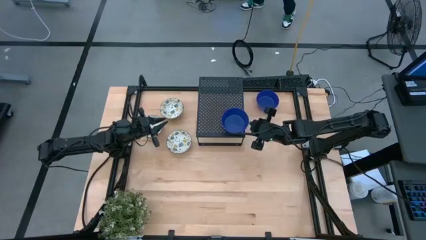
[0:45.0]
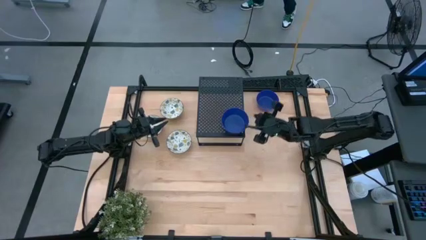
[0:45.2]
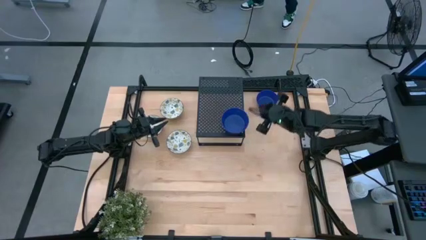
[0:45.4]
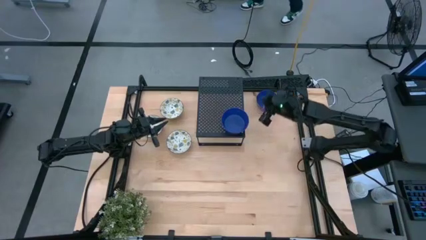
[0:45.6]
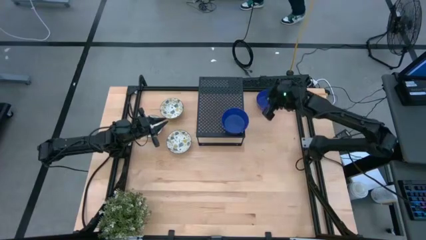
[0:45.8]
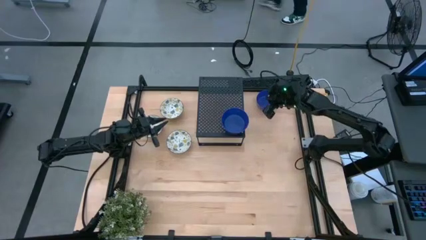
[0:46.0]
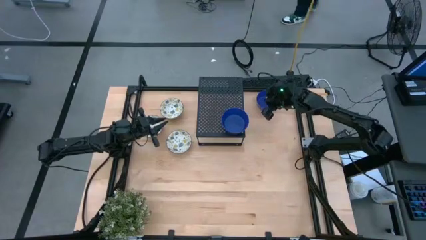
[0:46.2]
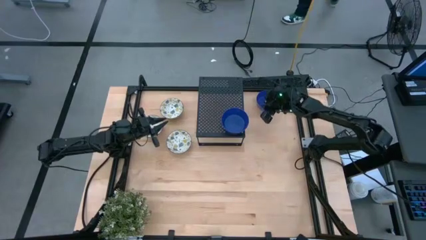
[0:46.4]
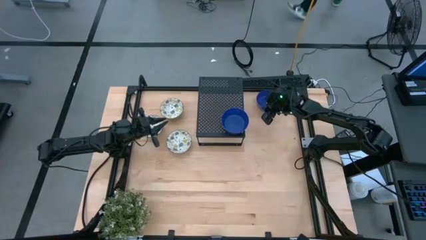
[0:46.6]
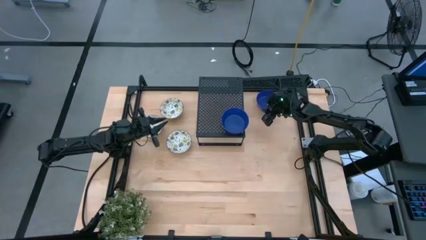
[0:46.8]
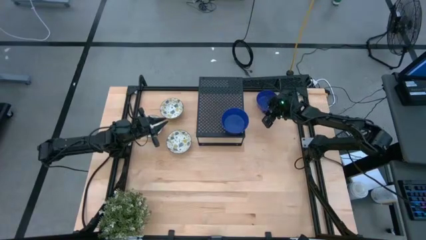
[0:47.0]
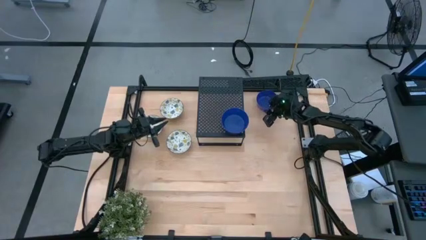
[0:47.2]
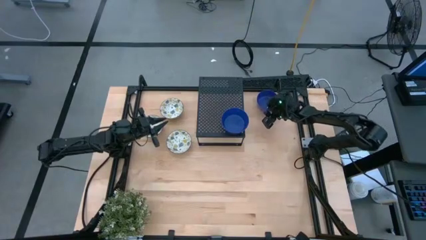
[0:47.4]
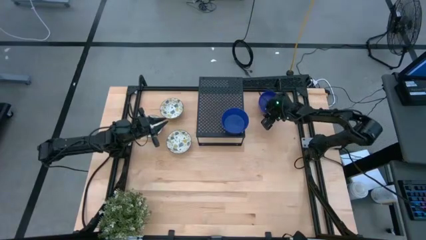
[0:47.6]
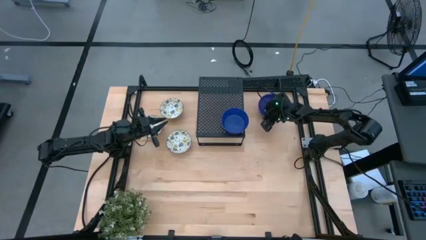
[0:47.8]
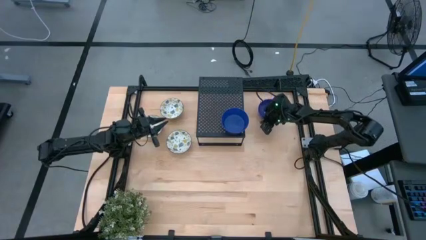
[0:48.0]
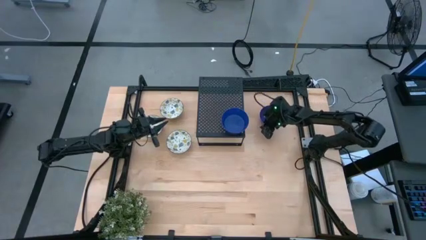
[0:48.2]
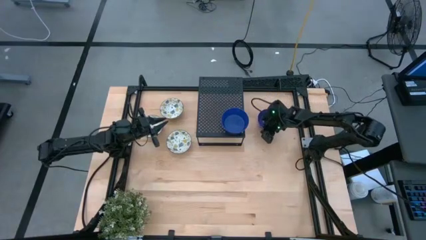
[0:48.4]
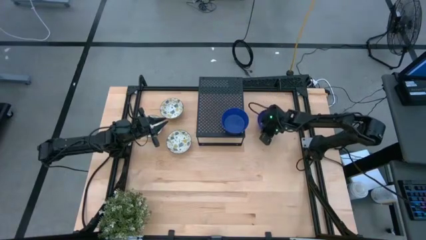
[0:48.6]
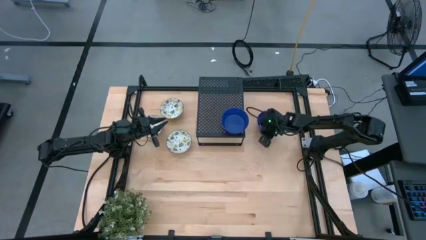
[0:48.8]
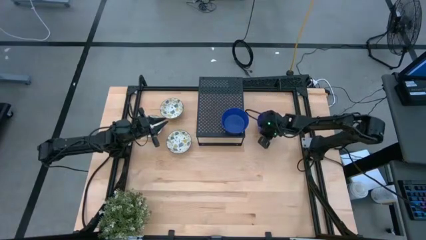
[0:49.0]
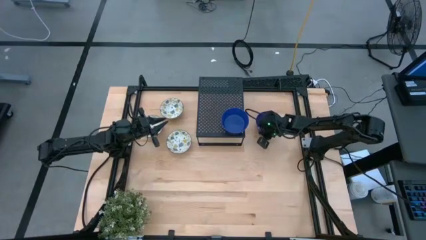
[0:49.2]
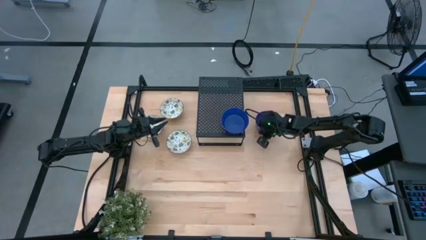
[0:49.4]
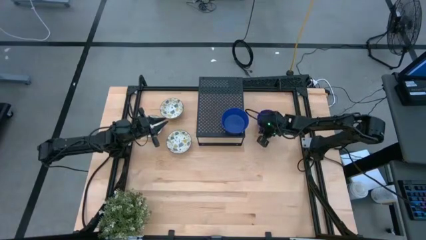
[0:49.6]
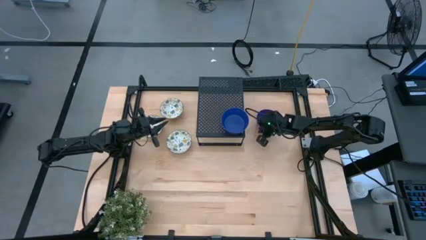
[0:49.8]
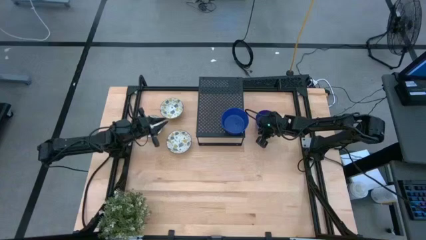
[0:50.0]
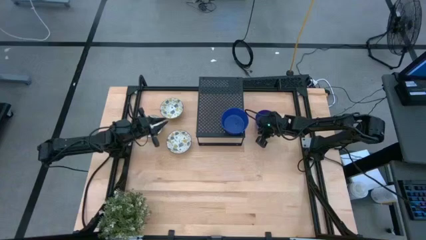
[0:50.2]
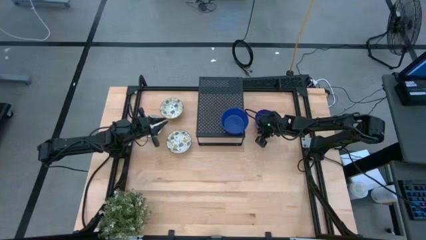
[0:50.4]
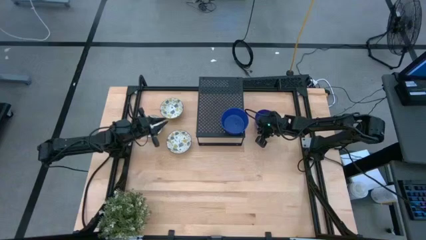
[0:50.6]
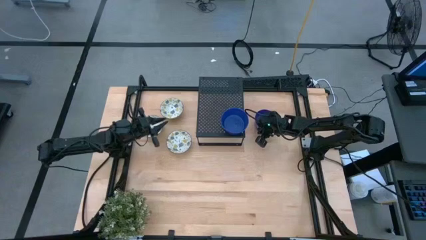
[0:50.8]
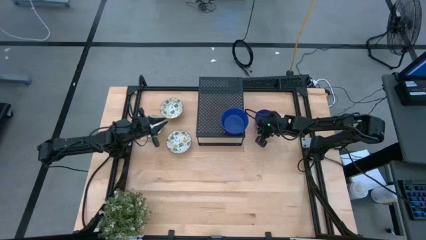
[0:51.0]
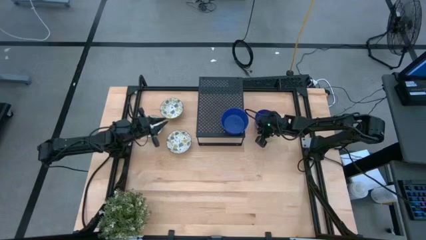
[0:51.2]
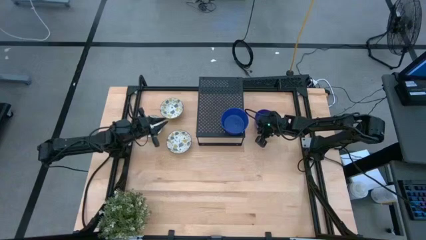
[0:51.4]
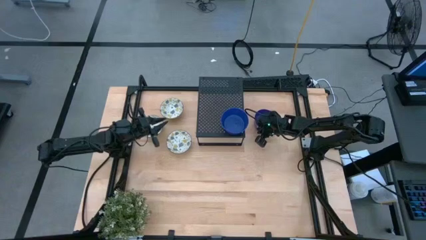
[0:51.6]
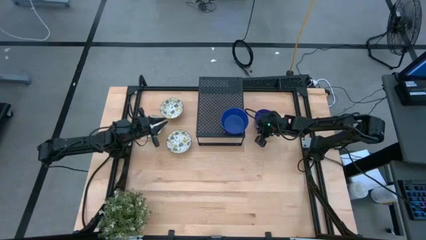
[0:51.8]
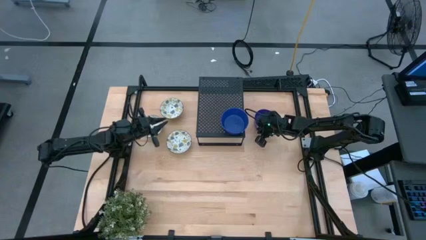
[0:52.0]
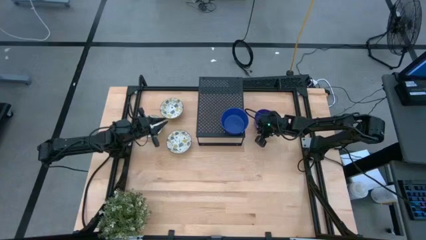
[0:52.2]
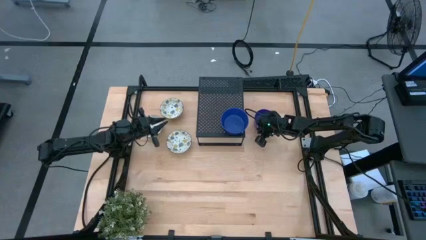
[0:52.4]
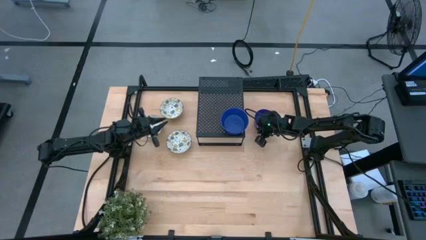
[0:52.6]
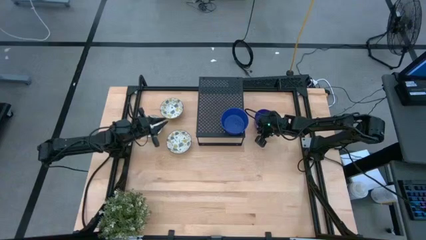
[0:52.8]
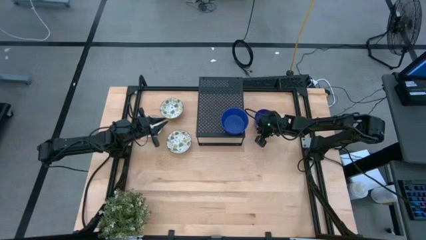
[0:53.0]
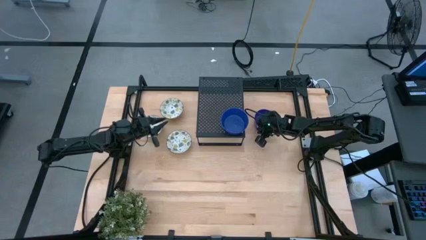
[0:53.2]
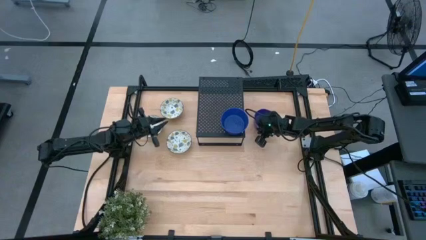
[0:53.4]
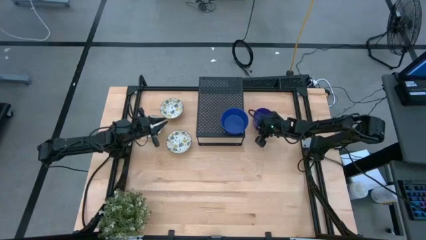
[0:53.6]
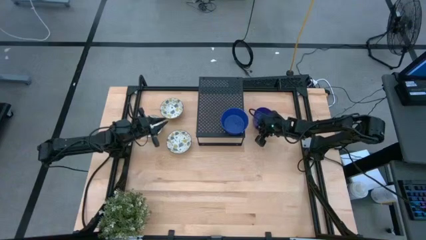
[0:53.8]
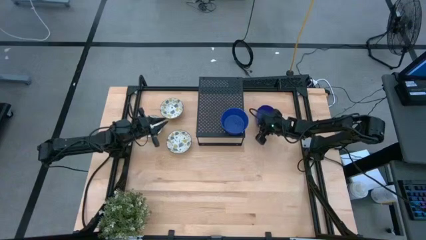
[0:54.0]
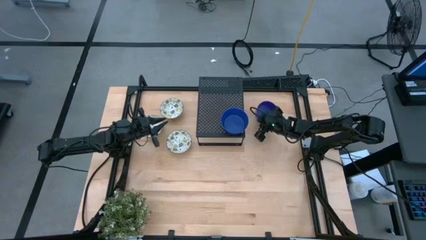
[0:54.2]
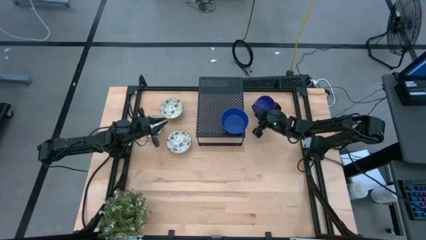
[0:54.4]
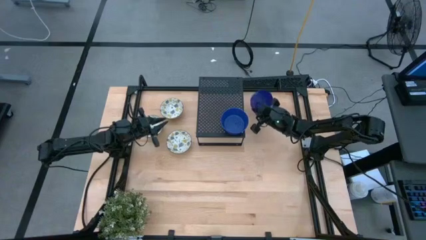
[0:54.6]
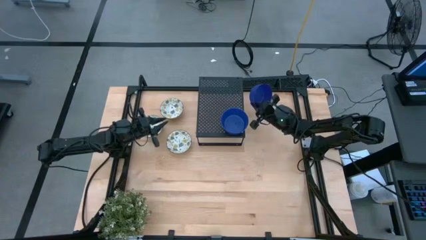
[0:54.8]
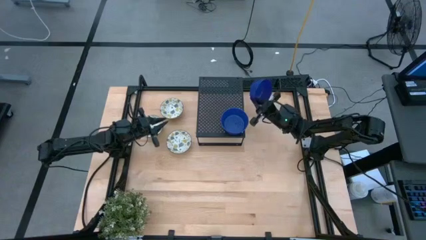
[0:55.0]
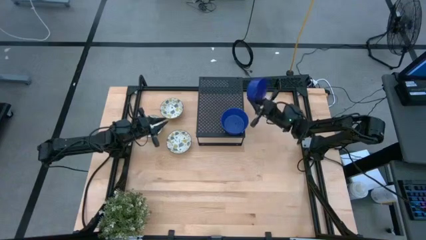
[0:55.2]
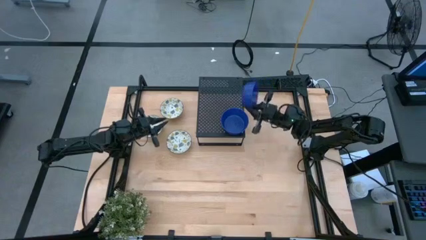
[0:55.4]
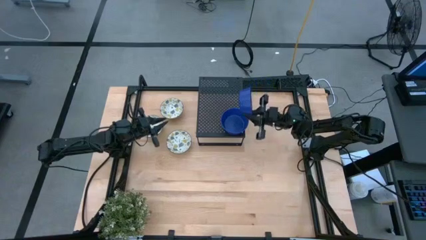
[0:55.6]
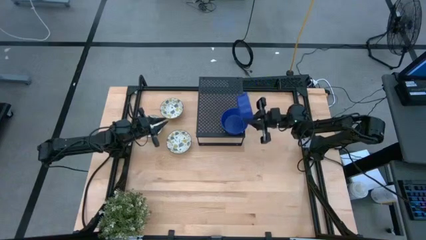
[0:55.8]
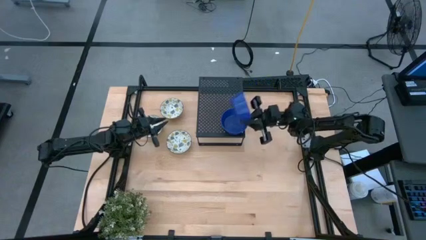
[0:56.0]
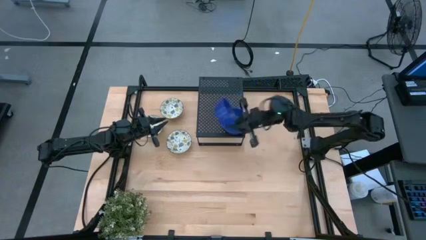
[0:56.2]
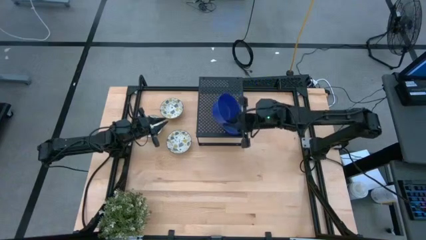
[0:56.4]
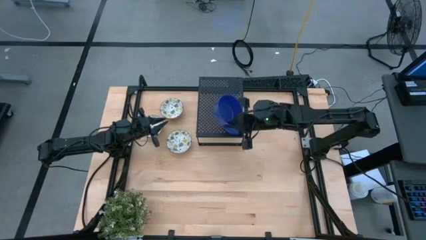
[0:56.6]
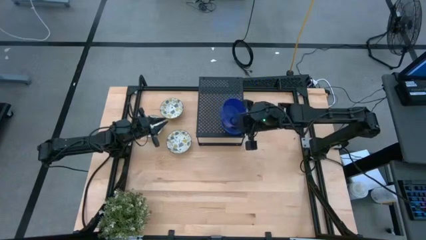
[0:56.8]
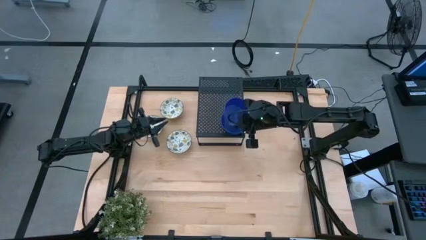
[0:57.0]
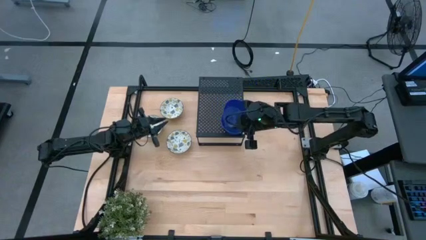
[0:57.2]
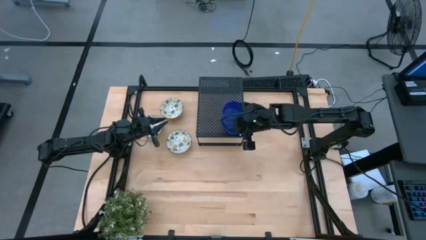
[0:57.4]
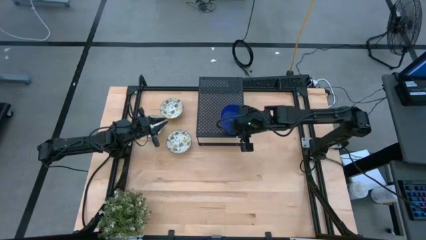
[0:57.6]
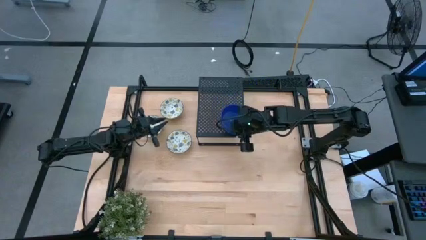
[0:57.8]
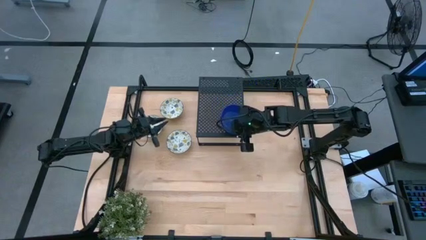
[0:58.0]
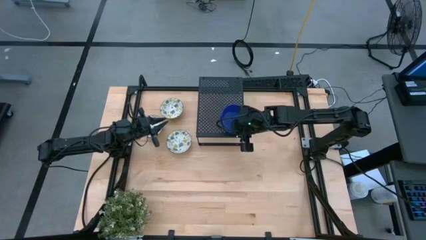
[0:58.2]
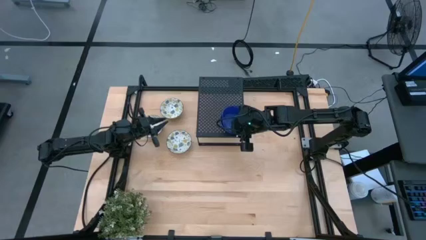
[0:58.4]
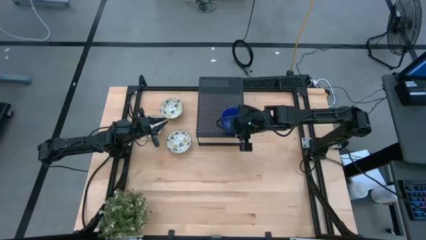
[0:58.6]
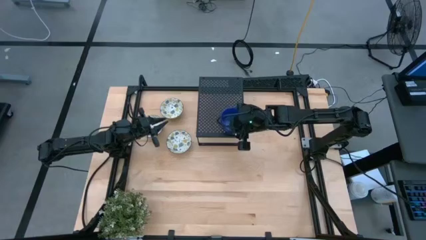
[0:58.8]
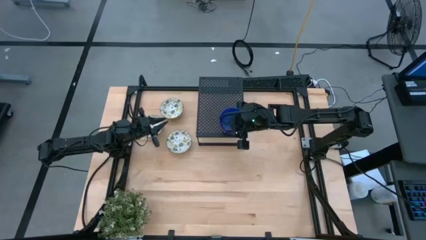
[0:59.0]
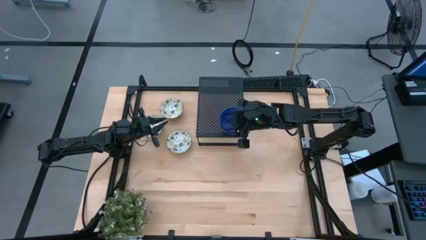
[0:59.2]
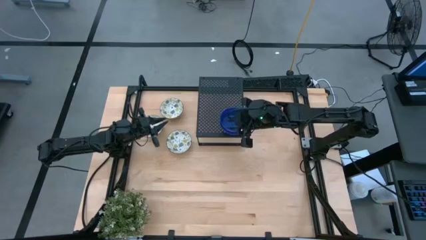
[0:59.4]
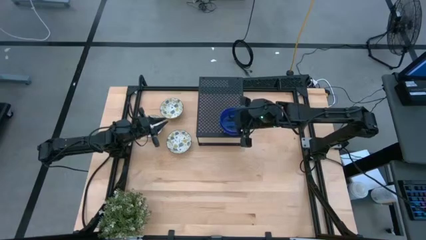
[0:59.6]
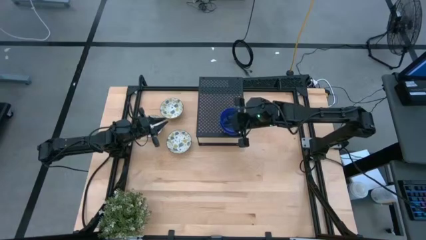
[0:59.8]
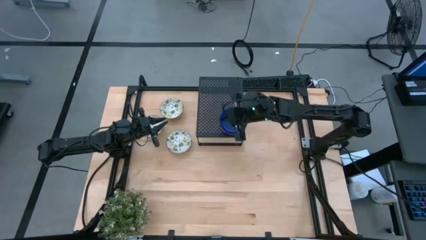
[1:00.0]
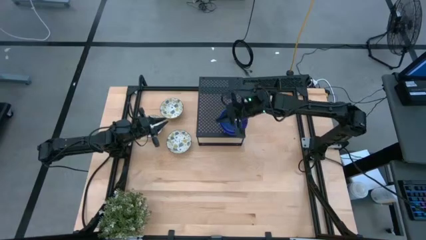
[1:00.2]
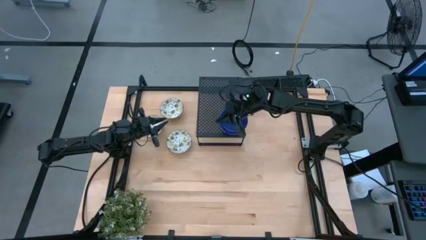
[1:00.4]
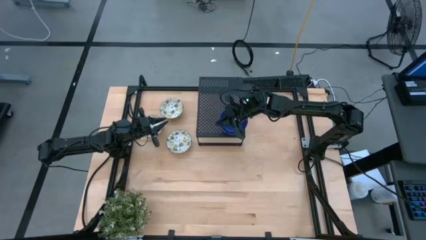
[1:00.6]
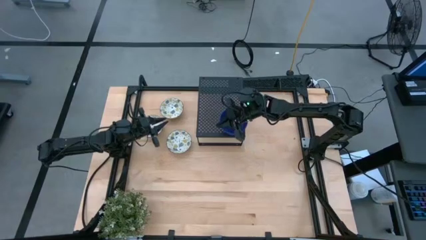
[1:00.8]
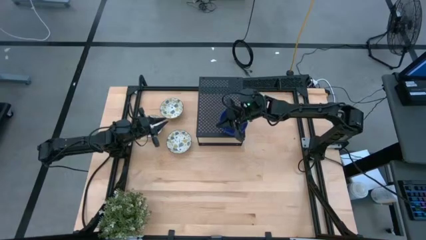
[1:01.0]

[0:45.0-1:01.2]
Task: Pick & Place Mini bowls
Stack the blue bowl on the blue bowls on the shelf
